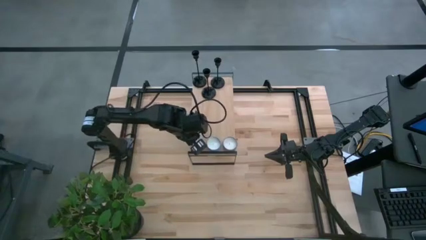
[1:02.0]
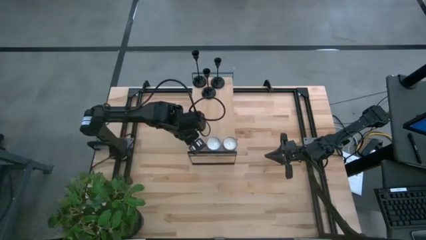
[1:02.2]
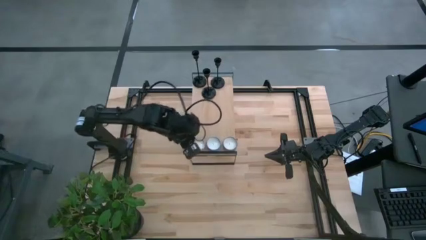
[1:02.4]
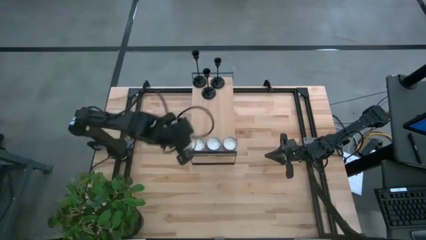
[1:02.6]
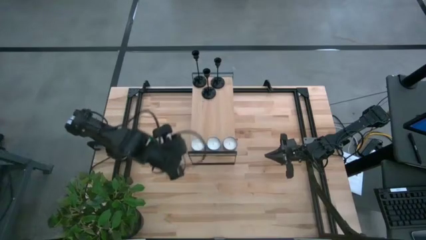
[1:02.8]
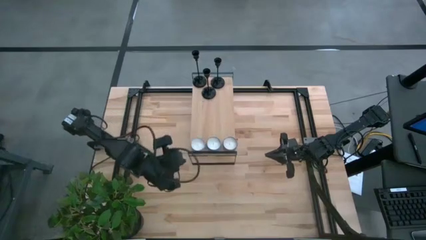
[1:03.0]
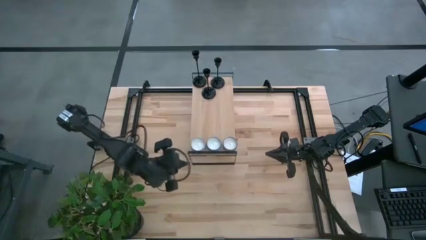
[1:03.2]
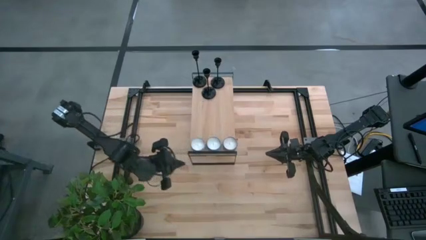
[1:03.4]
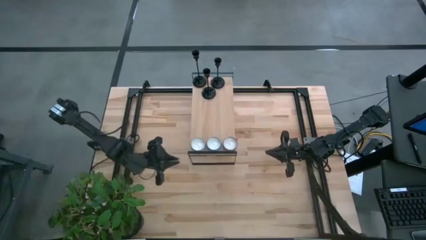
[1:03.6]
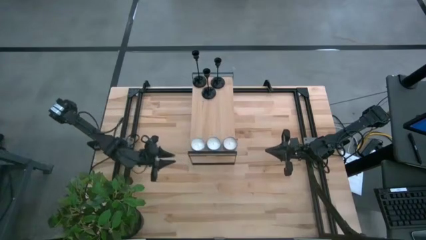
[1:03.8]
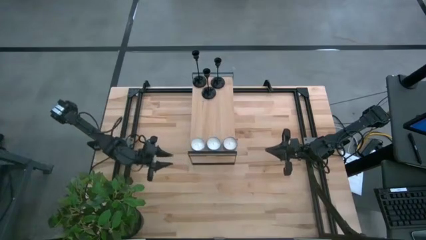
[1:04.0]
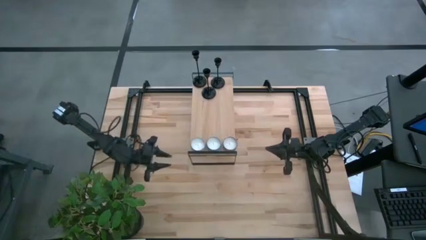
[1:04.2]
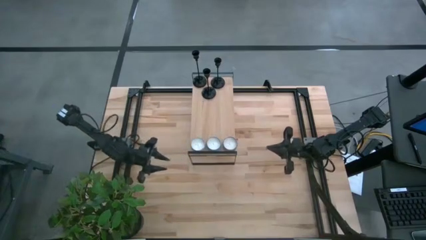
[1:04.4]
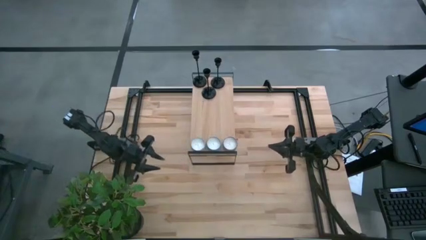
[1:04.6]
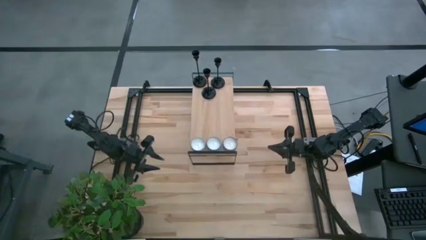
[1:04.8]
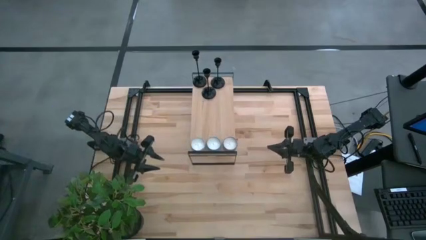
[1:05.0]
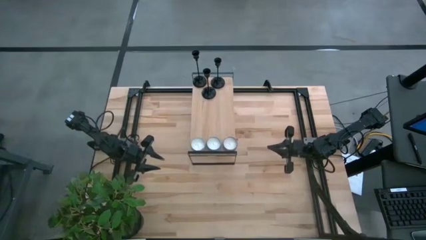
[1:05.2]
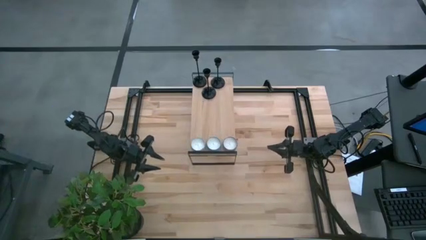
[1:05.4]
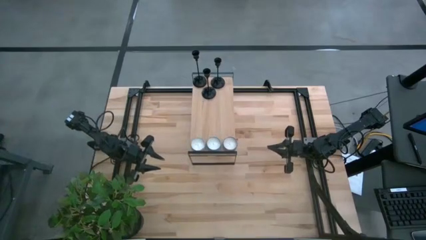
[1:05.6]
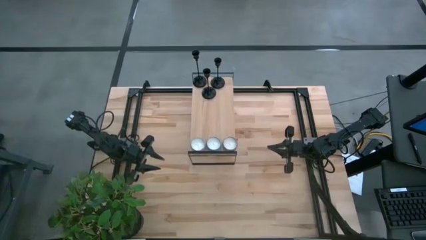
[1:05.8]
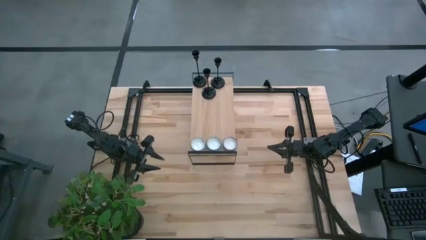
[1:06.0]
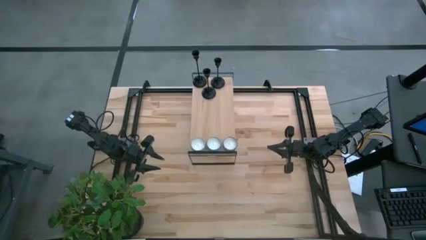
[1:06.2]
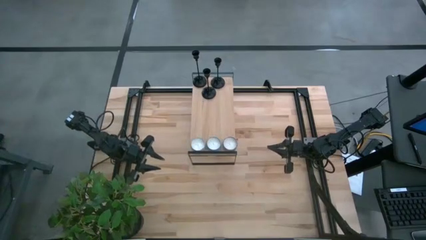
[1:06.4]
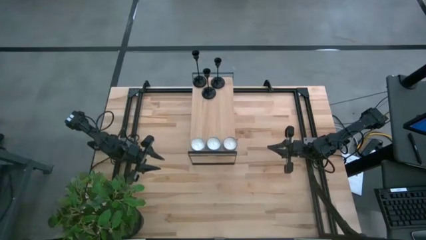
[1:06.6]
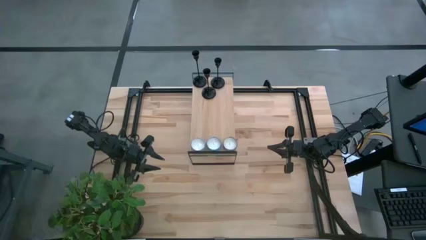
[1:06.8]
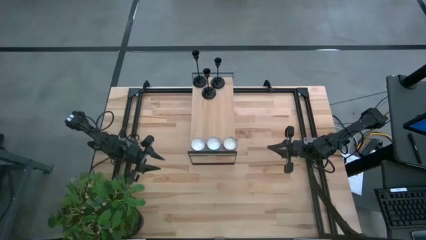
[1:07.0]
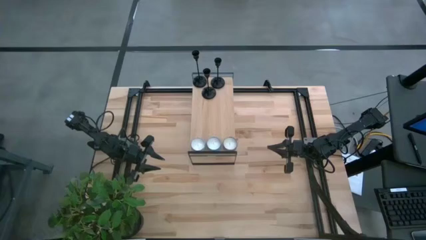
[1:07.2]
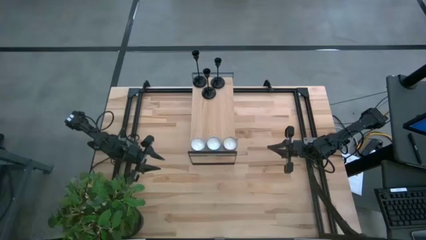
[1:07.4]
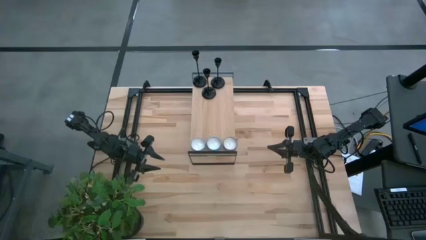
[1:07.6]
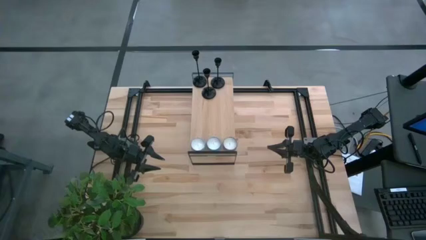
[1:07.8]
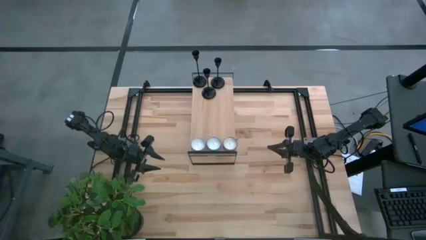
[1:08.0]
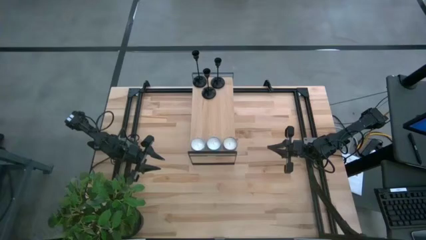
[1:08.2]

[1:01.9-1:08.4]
Task: Pick & Place candle stick holders
Return to Home Position

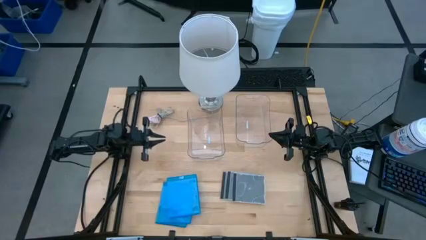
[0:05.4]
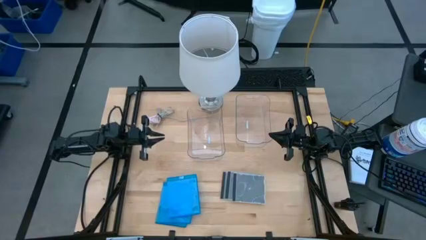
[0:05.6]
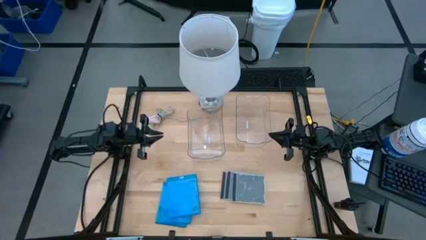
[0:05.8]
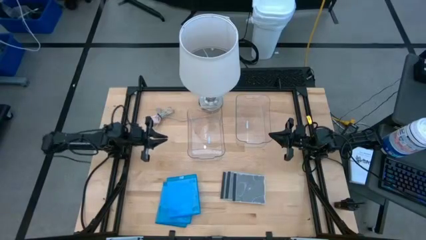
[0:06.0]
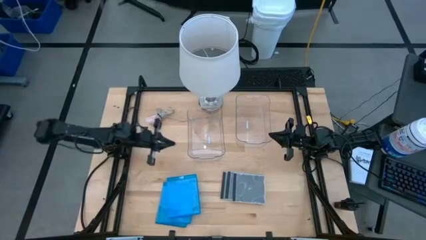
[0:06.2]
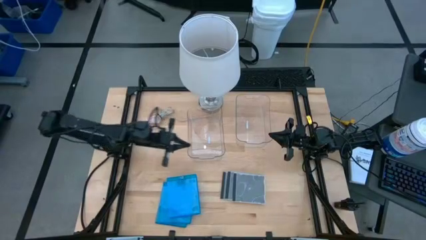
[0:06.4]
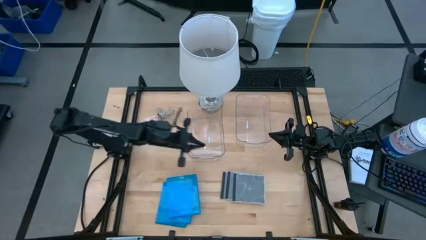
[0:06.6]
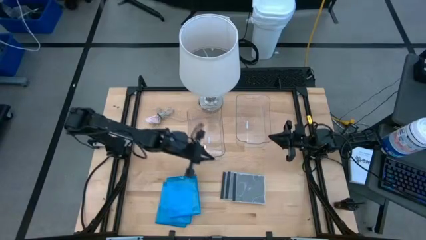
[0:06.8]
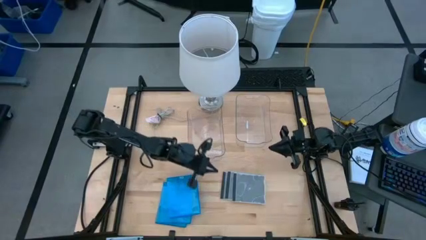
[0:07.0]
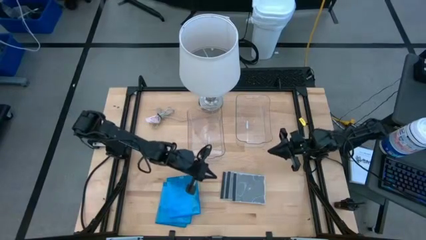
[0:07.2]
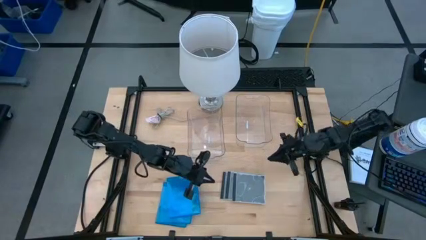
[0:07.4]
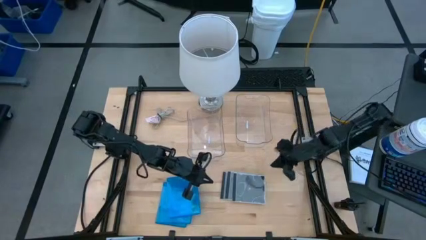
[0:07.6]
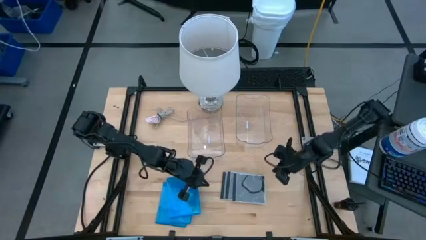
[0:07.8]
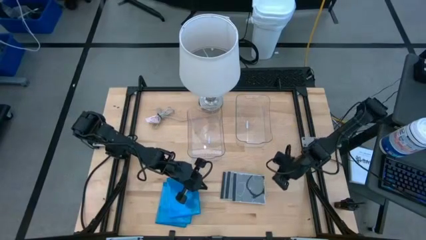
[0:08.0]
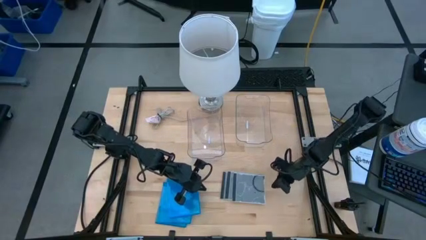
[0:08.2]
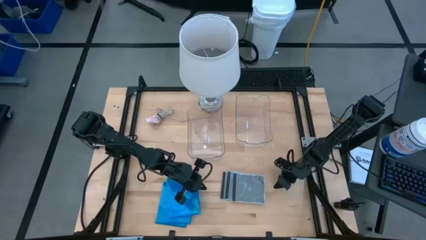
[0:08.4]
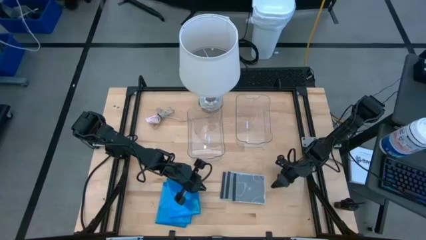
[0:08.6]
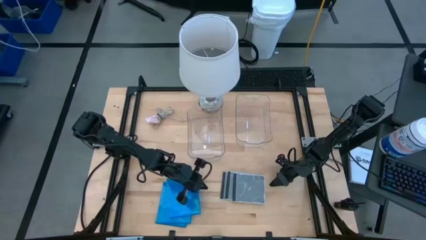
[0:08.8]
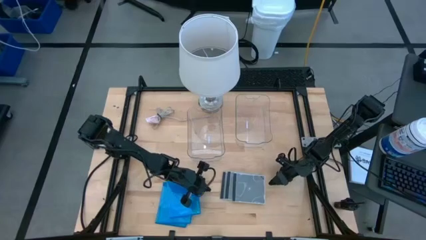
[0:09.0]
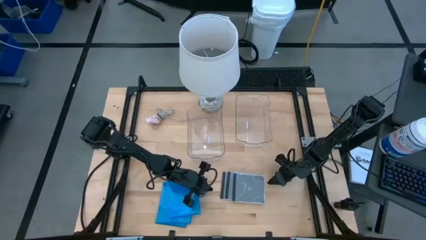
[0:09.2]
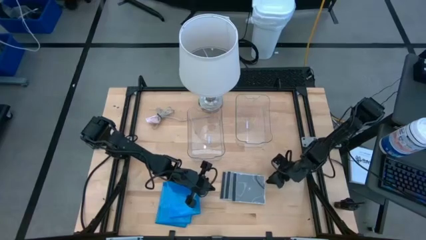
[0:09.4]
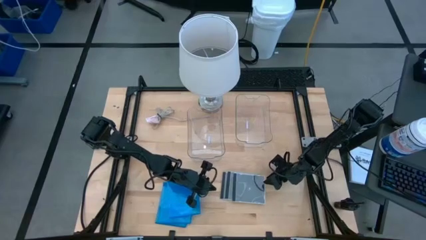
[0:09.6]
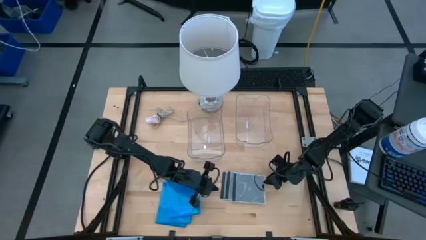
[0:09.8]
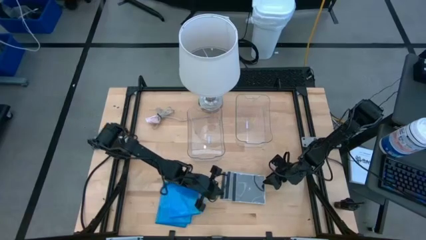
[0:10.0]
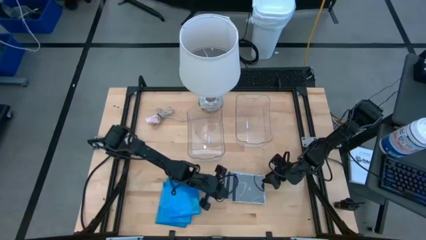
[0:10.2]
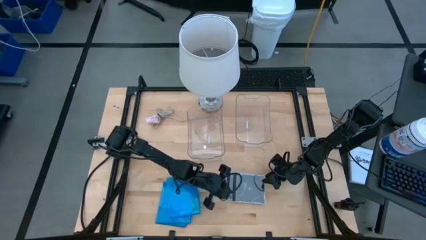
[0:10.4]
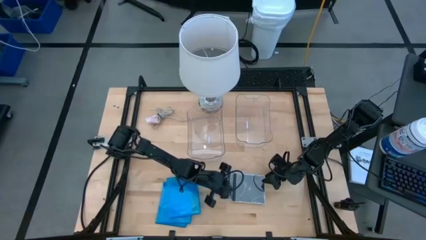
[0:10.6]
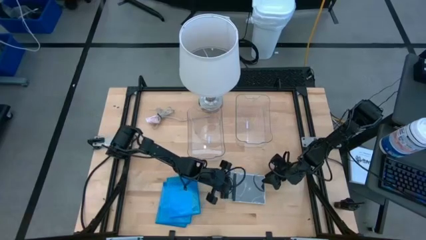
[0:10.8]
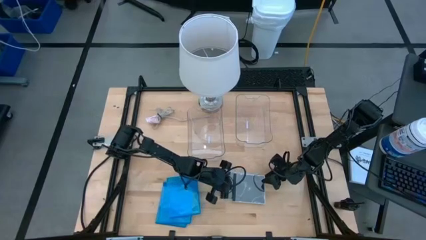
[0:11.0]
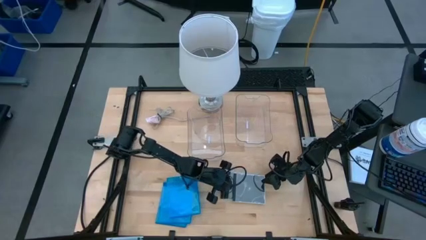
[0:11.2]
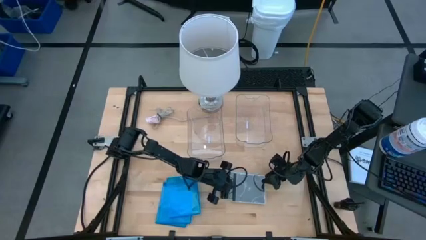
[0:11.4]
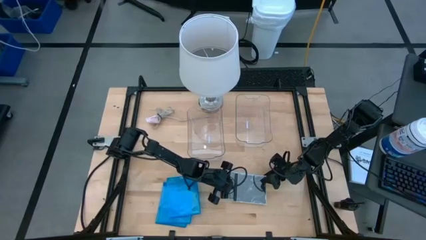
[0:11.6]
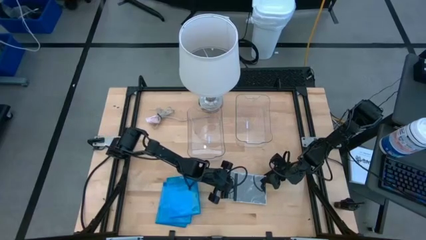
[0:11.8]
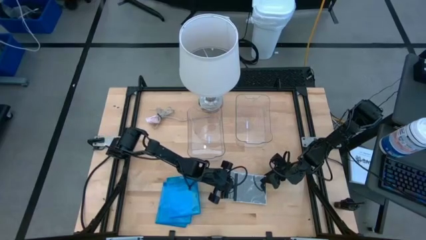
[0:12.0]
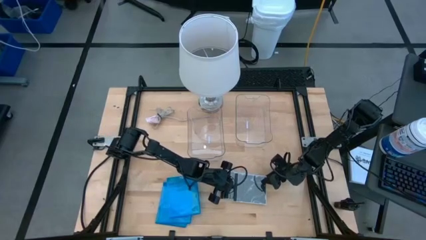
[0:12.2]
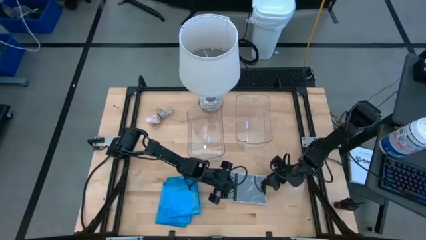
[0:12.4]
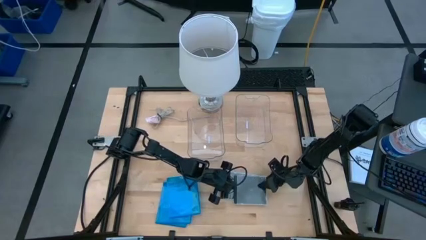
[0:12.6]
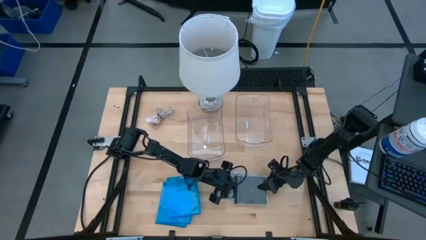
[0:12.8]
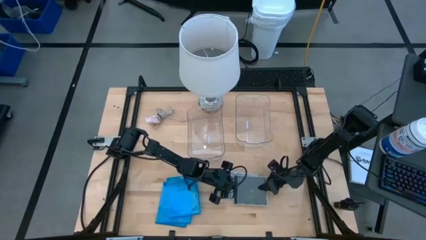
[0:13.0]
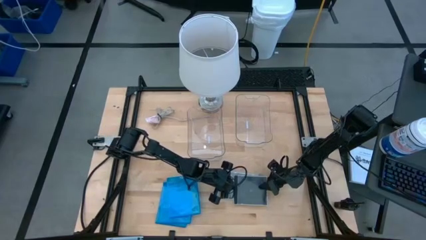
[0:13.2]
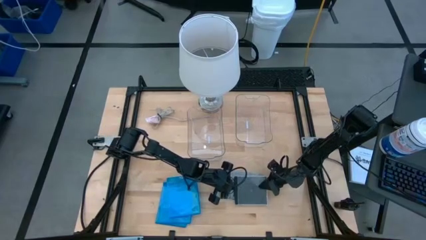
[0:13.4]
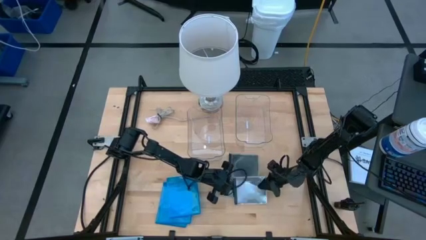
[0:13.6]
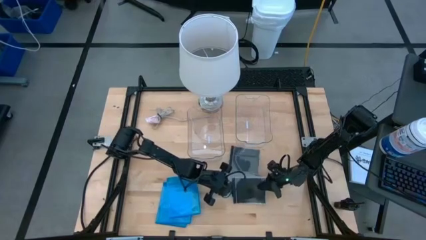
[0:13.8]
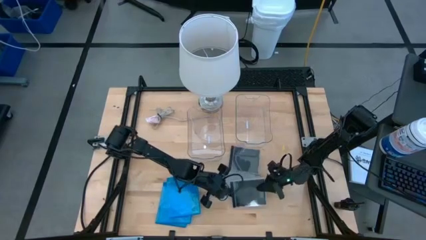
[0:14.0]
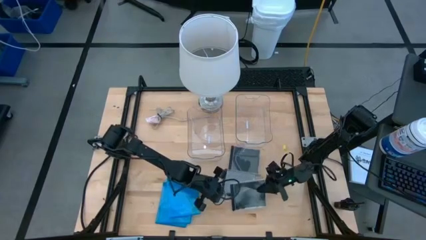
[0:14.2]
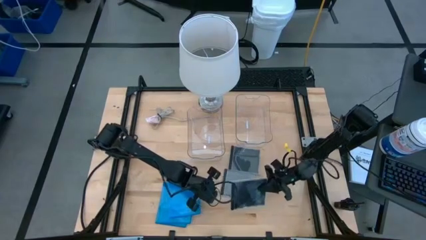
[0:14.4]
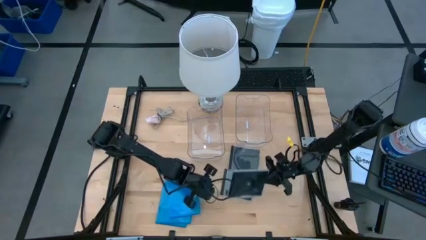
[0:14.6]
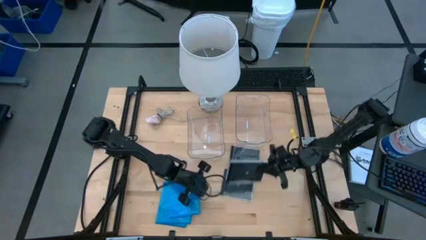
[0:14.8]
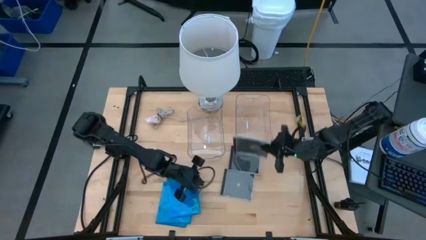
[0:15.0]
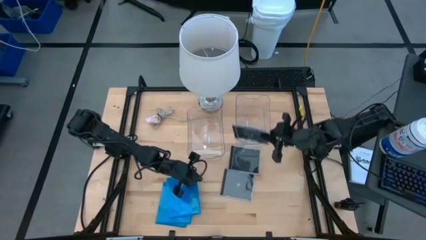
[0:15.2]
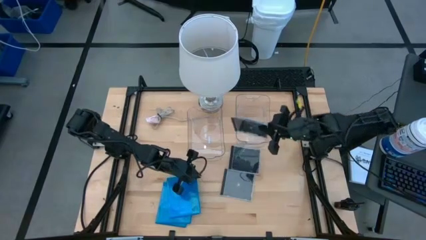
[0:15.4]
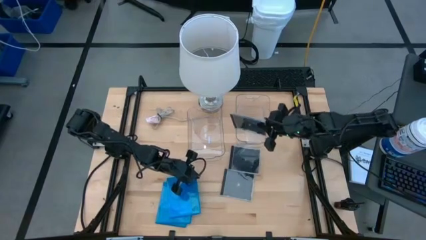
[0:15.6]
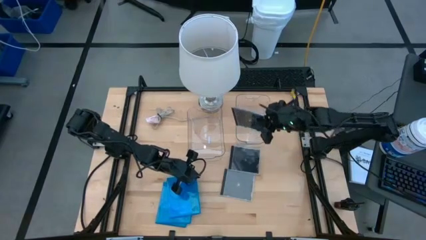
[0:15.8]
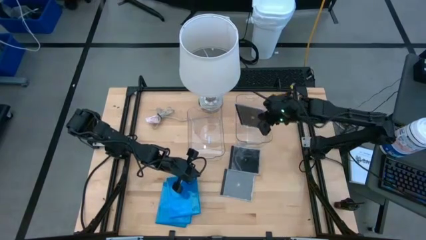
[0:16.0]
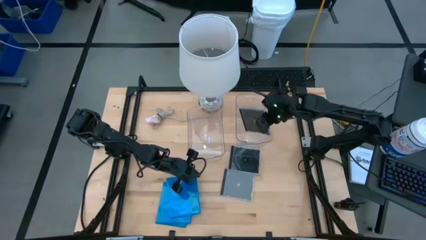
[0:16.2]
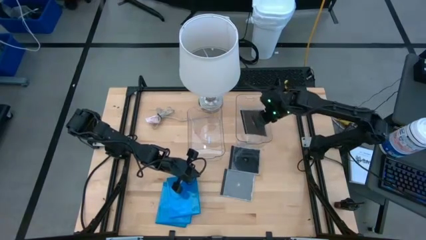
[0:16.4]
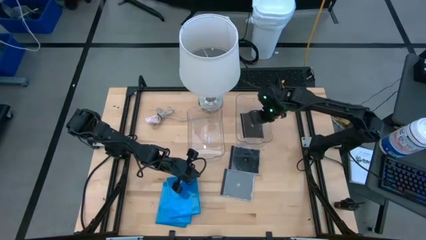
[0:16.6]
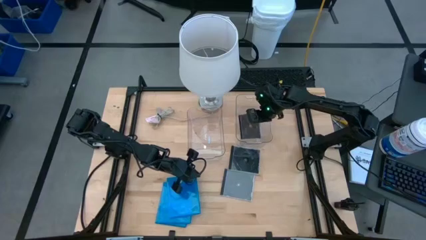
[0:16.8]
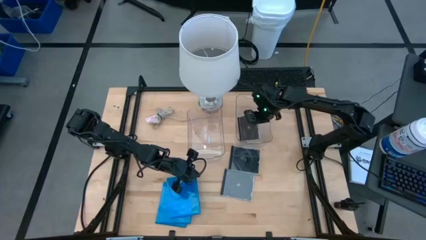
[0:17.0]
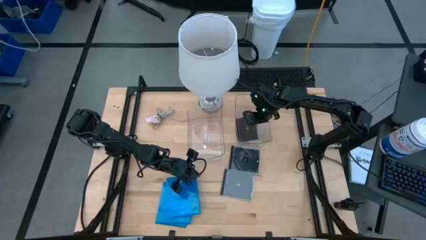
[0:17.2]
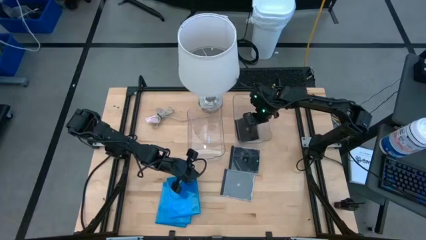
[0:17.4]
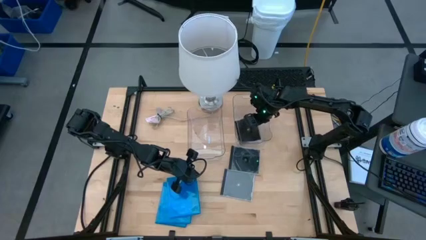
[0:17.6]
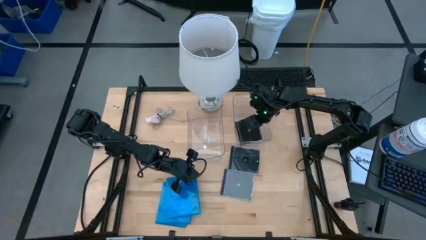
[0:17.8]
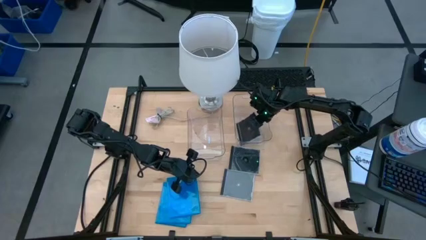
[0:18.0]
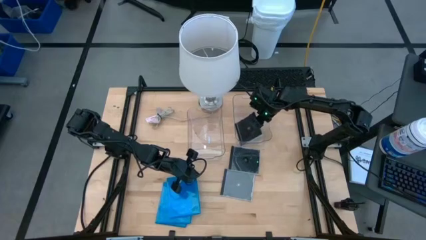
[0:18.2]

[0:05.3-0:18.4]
Task: Pick & place jewel cases by type
Put the black cd case into the right transparent bin
